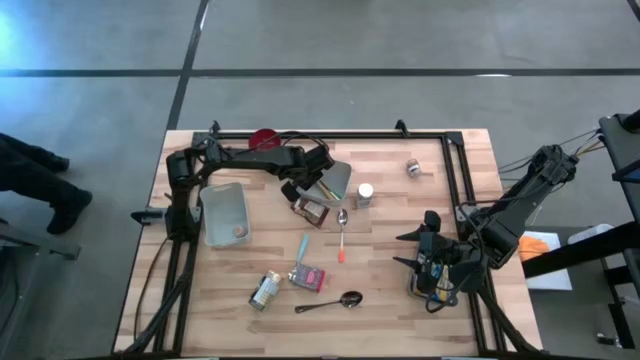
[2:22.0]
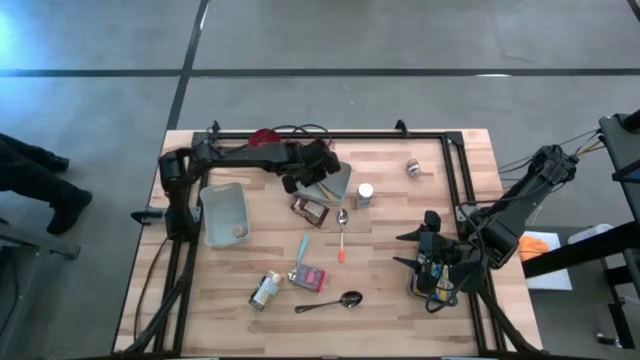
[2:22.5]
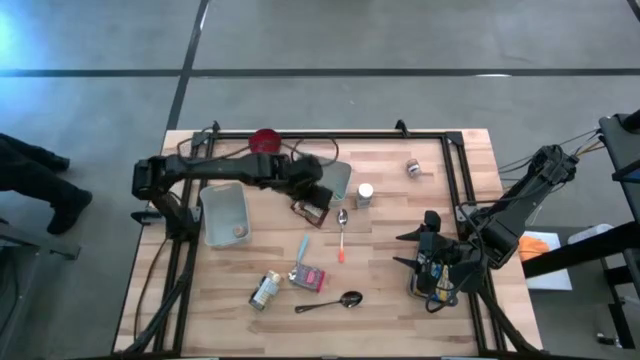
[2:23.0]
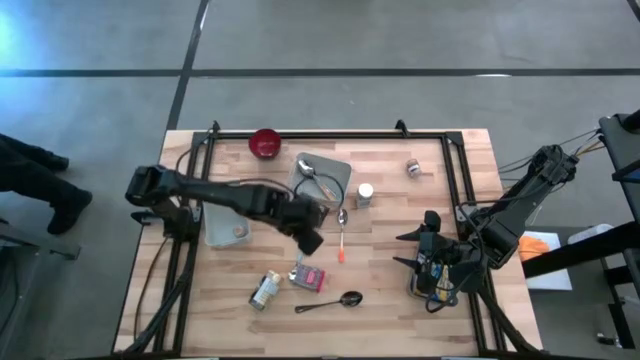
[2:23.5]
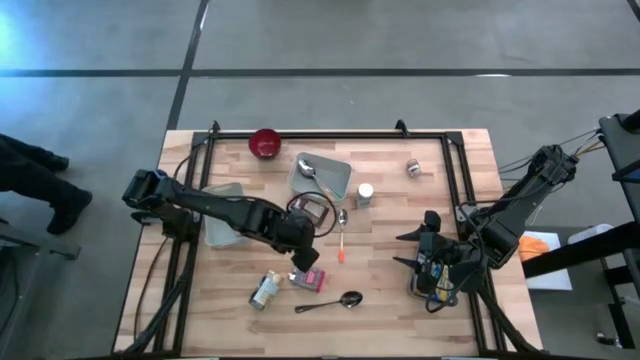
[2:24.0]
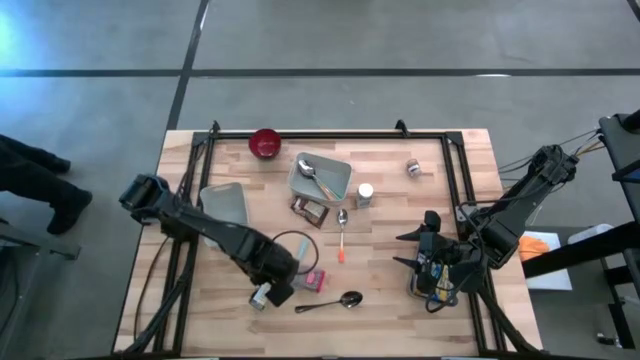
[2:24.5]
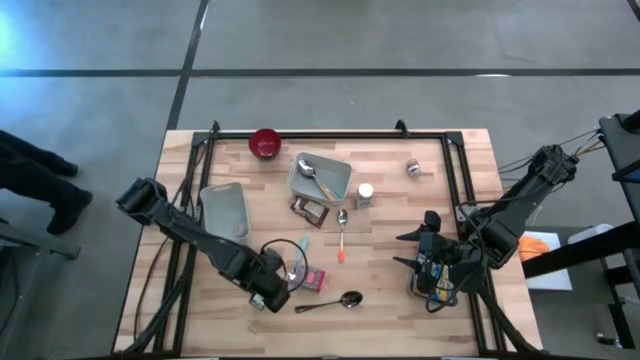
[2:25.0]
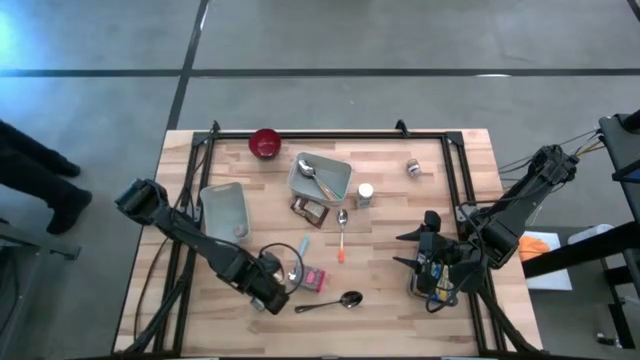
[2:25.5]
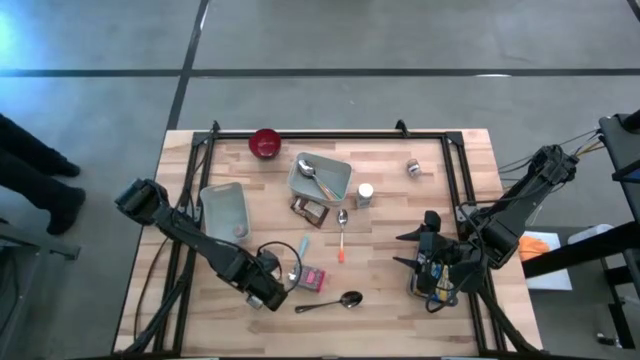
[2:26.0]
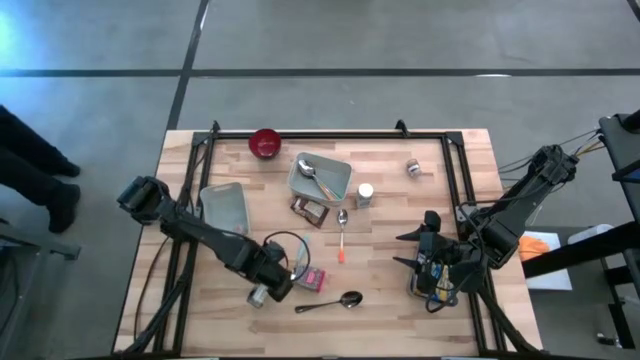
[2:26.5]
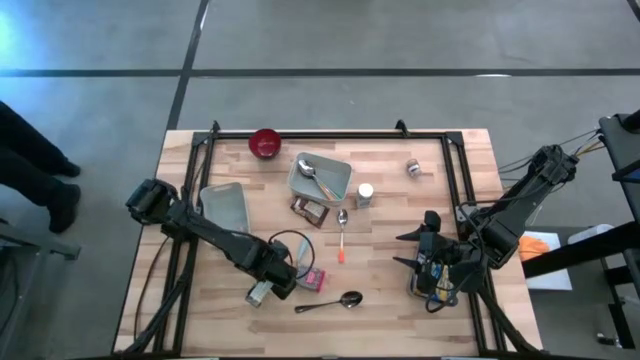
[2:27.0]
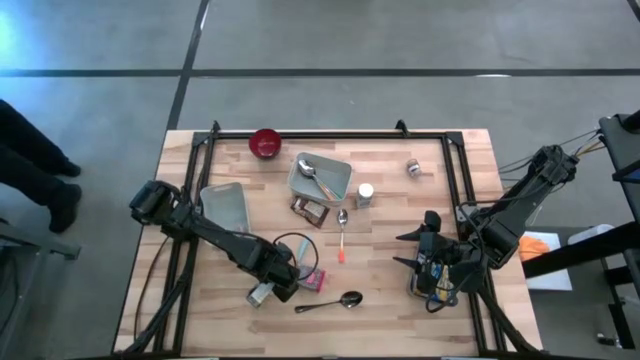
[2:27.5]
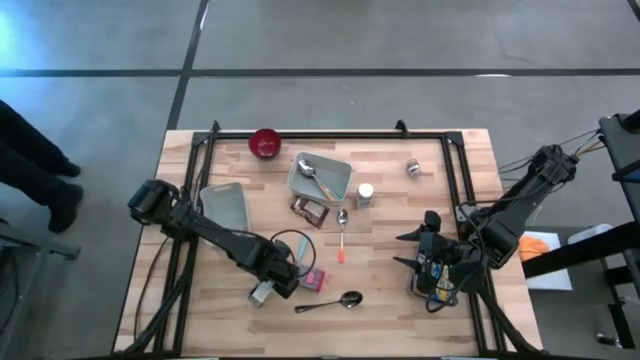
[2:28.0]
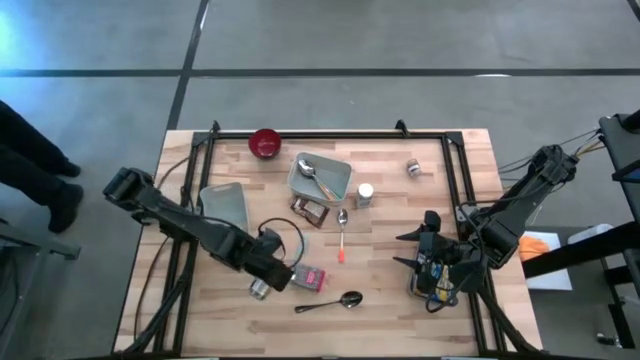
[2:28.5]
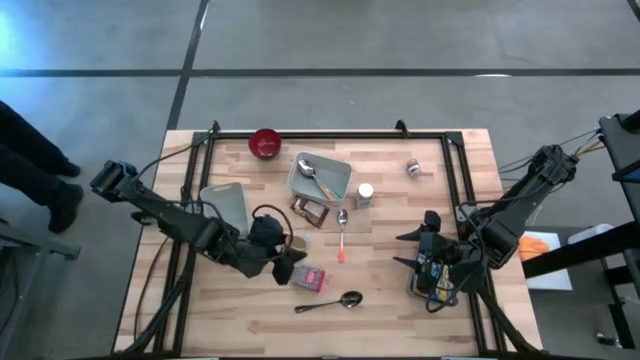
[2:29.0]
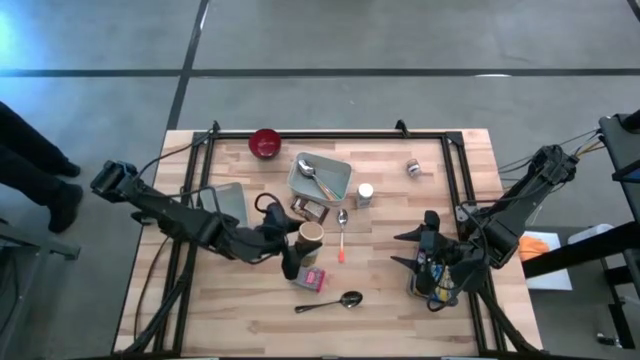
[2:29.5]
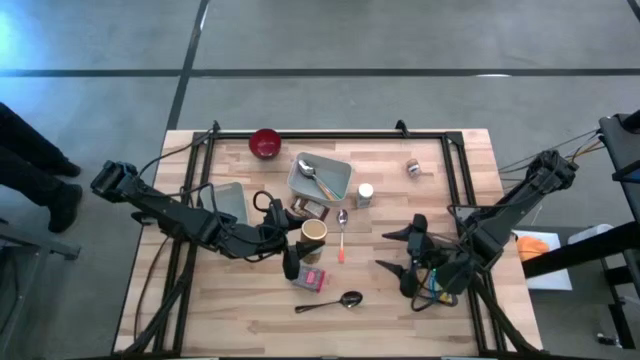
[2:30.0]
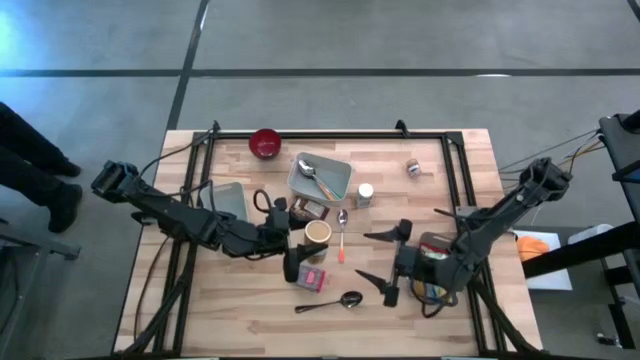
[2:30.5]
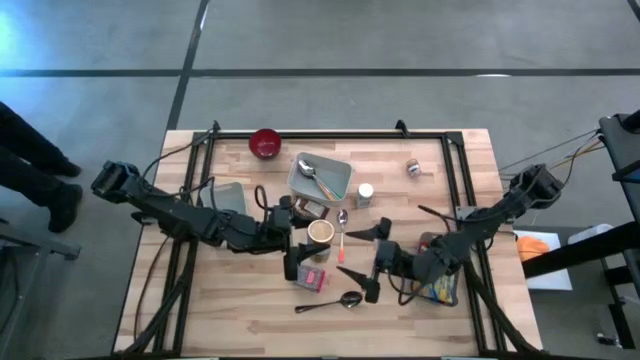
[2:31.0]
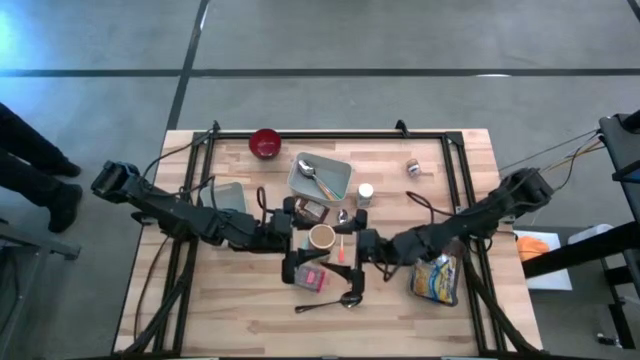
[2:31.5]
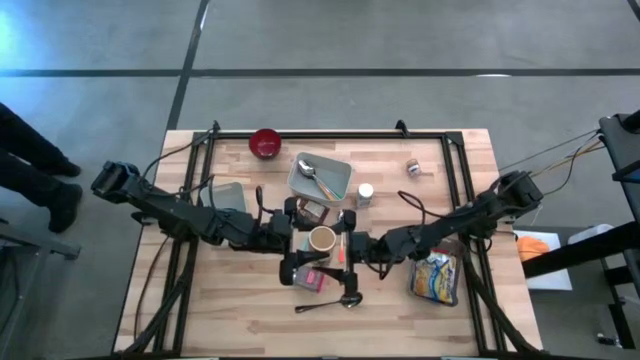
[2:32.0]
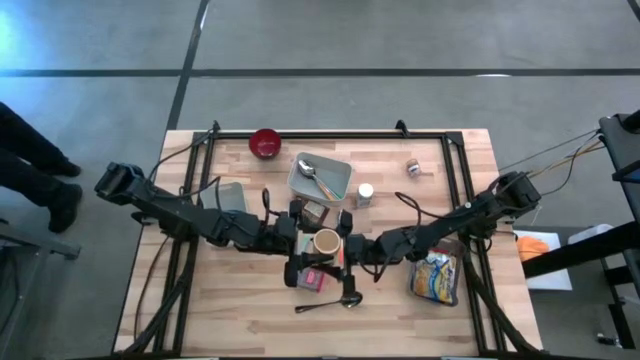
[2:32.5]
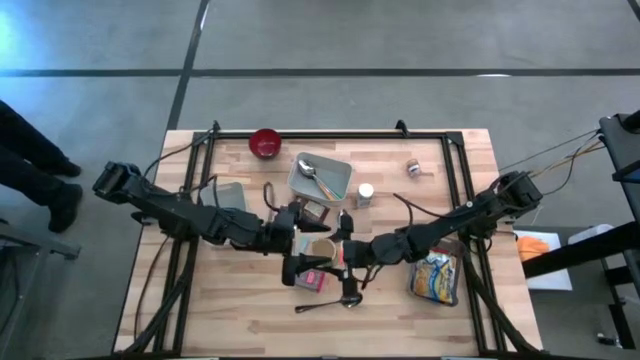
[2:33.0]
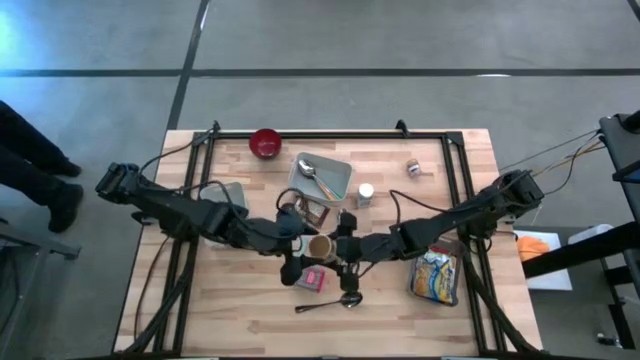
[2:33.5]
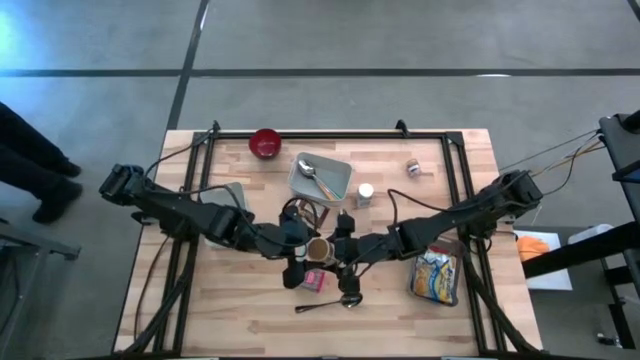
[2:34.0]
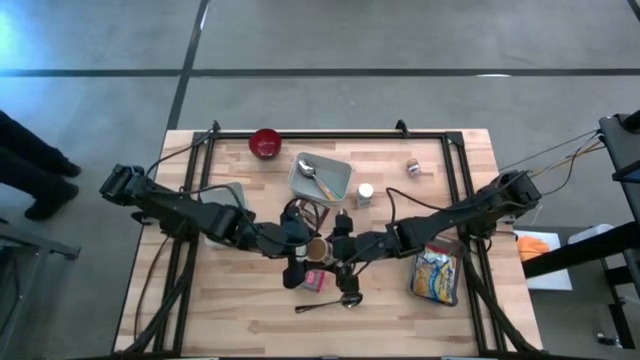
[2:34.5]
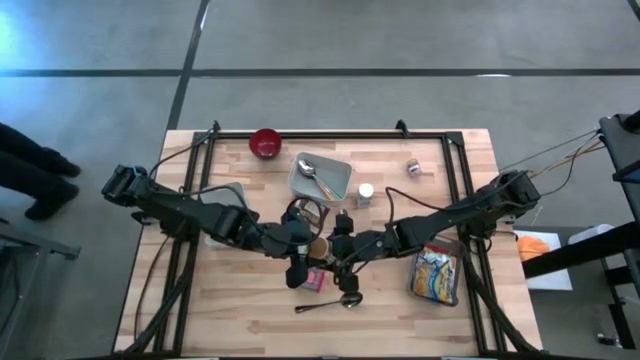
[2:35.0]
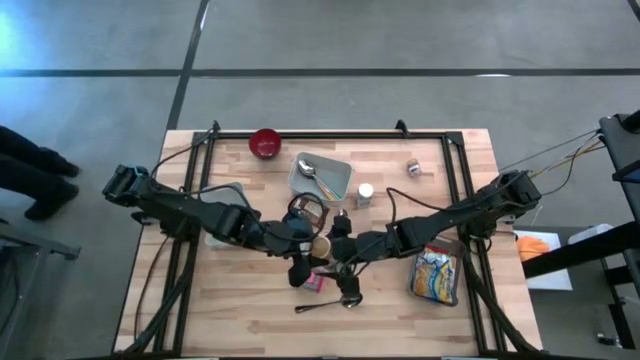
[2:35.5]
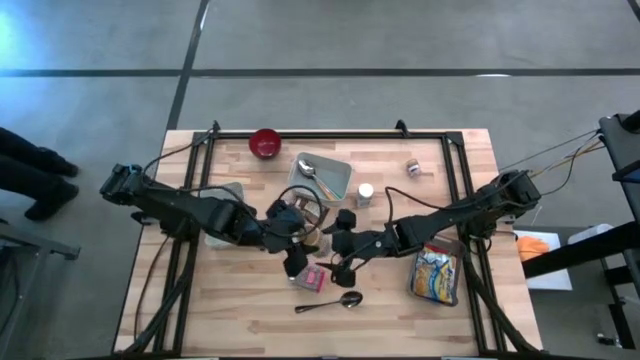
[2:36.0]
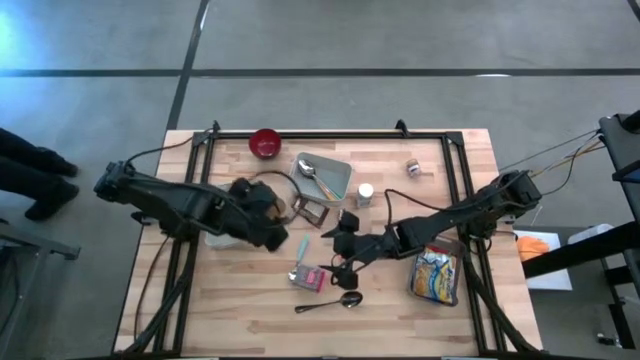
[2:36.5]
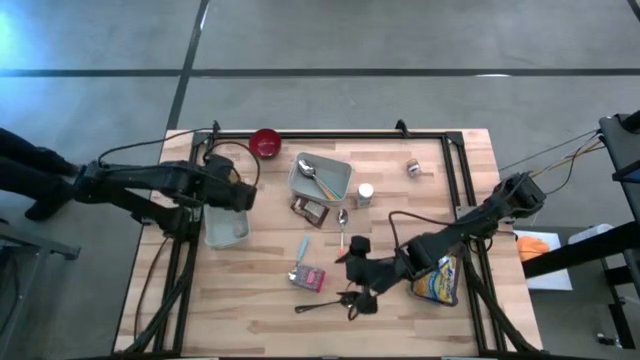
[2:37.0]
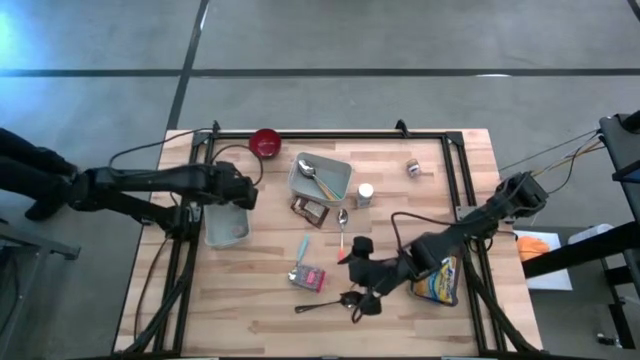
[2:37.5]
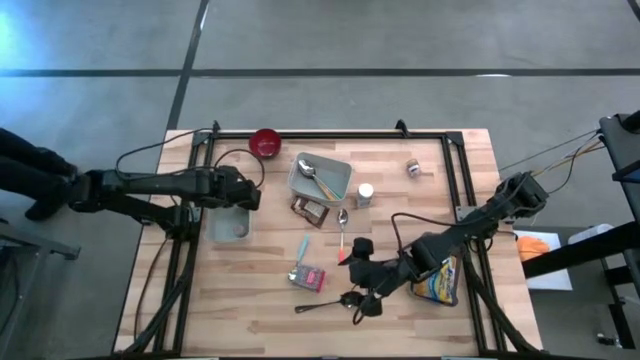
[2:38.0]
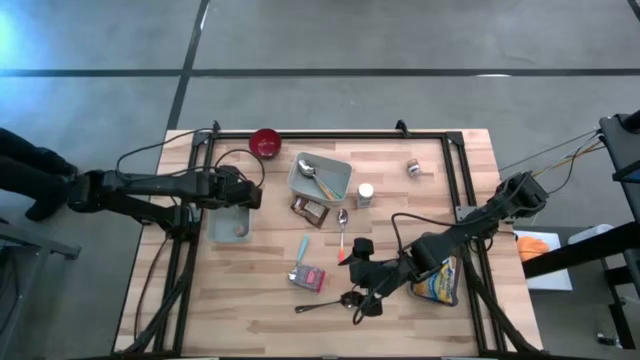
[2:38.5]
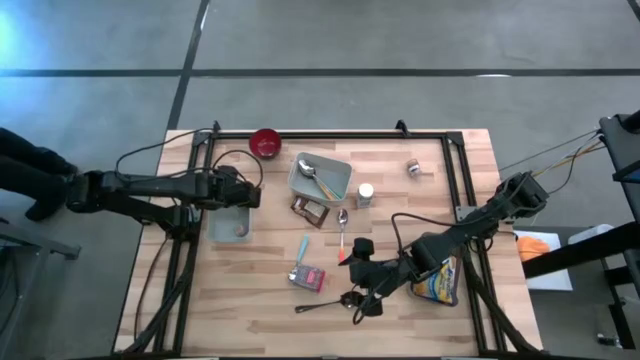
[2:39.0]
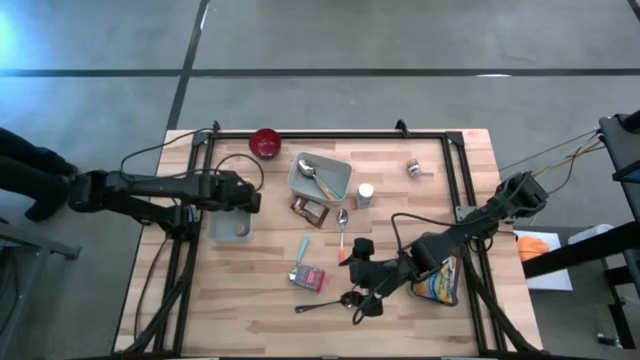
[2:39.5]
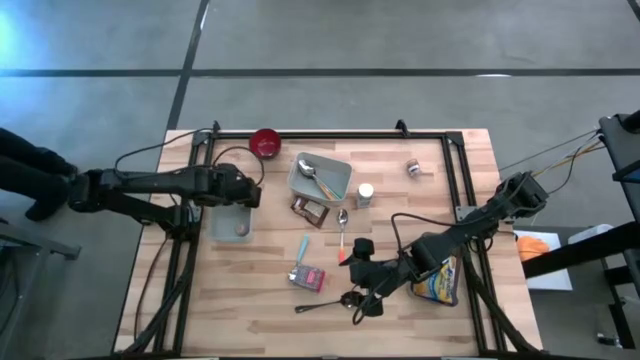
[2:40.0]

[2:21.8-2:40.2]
Put the gold seasoning bottle into the left gray bin
